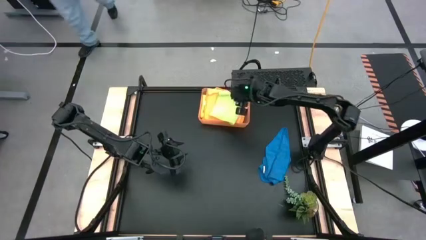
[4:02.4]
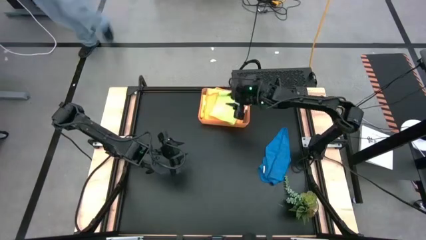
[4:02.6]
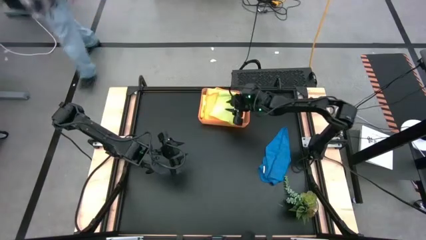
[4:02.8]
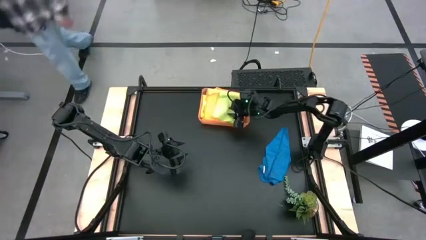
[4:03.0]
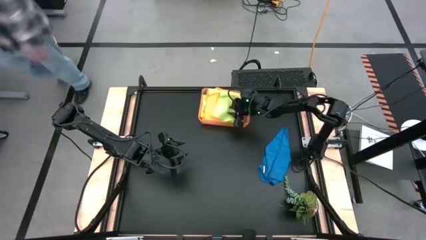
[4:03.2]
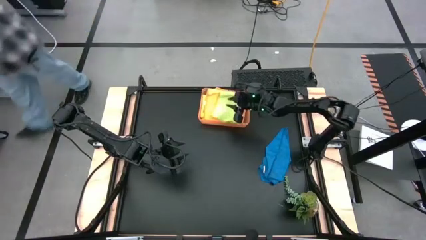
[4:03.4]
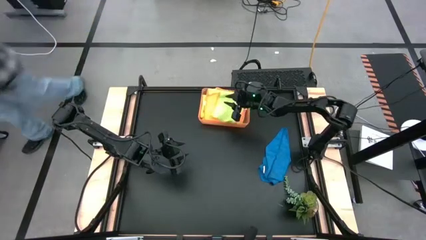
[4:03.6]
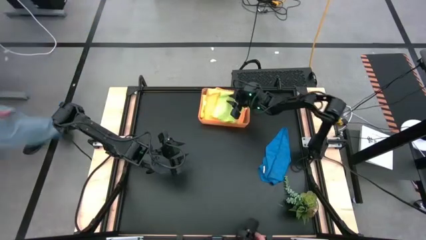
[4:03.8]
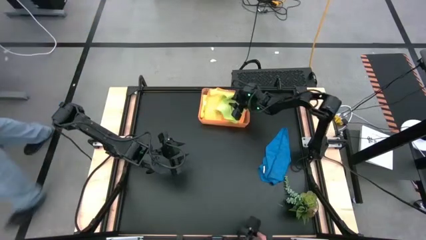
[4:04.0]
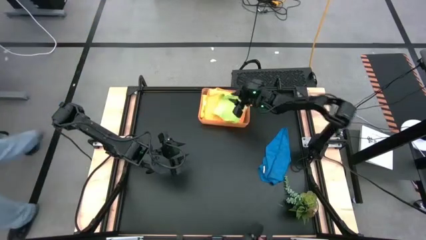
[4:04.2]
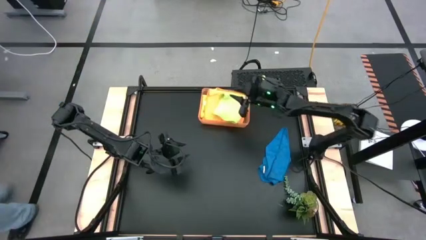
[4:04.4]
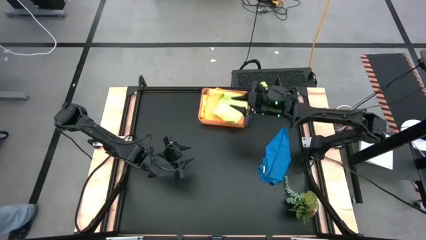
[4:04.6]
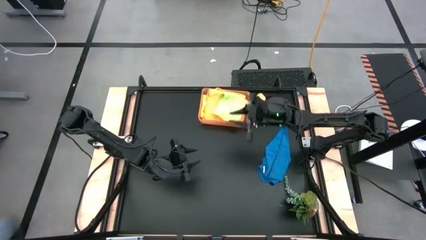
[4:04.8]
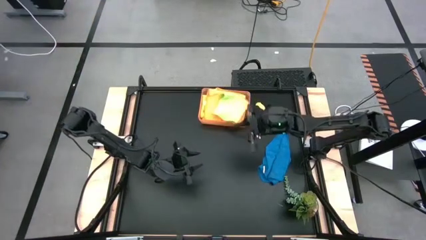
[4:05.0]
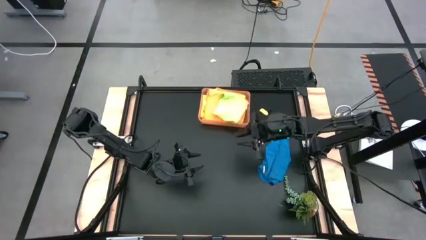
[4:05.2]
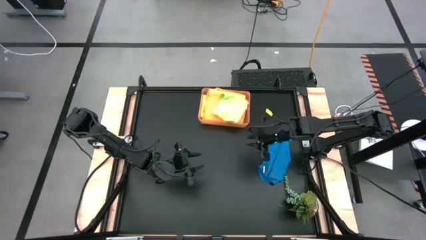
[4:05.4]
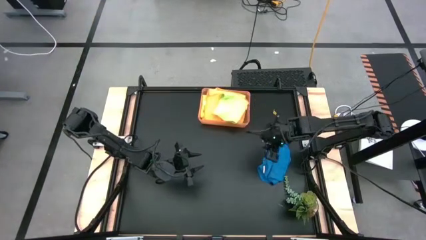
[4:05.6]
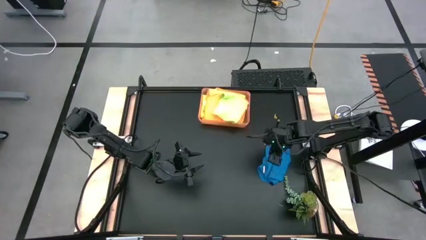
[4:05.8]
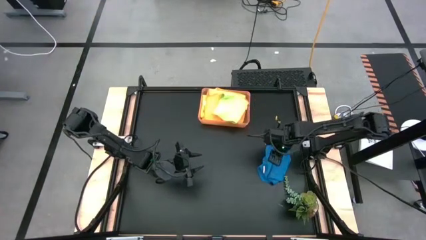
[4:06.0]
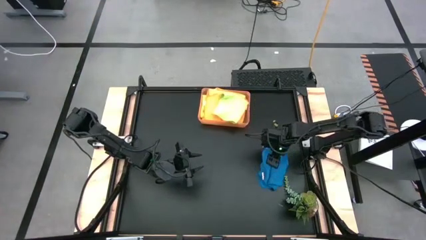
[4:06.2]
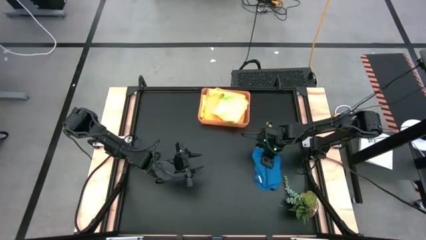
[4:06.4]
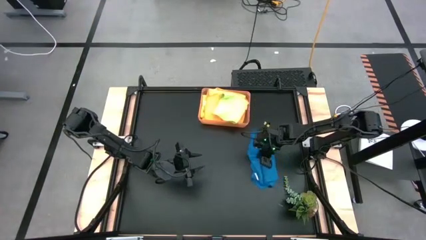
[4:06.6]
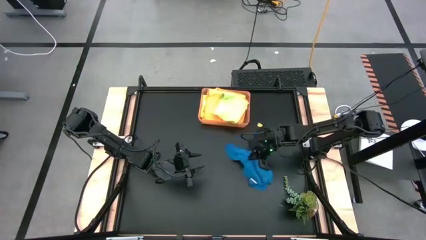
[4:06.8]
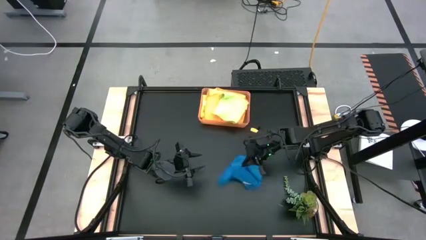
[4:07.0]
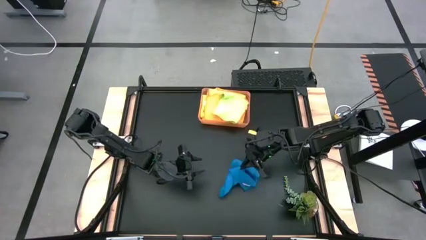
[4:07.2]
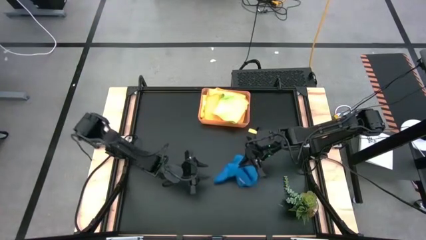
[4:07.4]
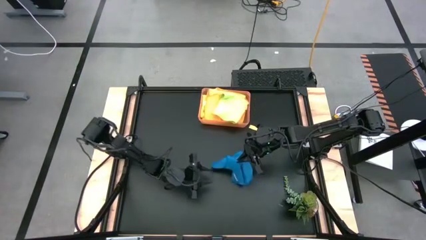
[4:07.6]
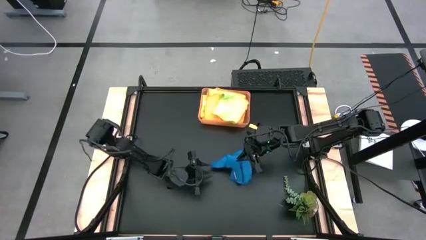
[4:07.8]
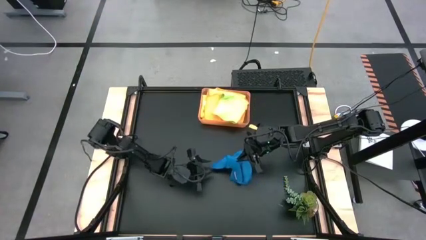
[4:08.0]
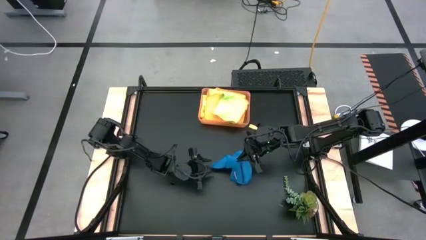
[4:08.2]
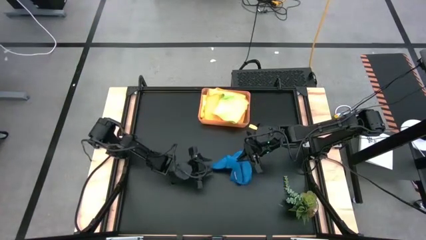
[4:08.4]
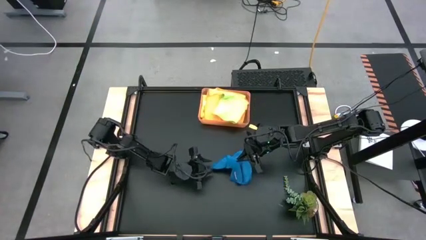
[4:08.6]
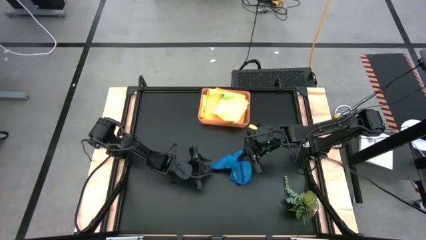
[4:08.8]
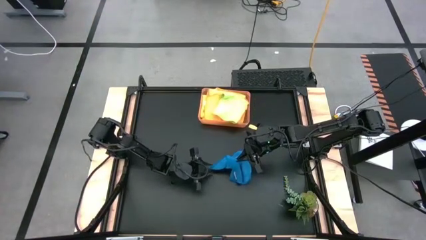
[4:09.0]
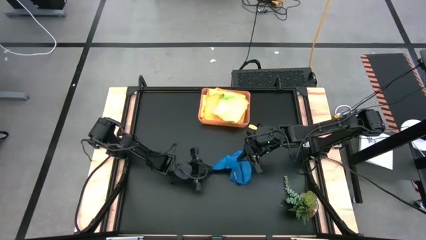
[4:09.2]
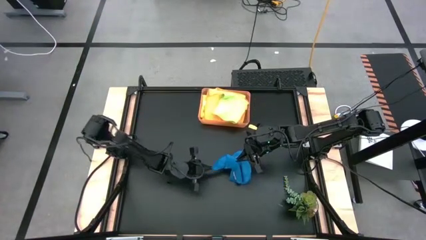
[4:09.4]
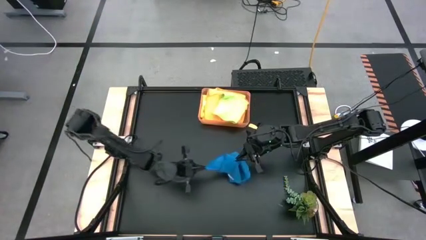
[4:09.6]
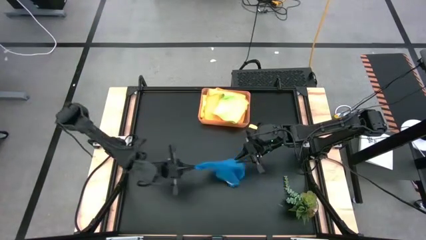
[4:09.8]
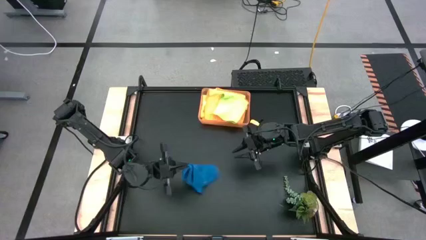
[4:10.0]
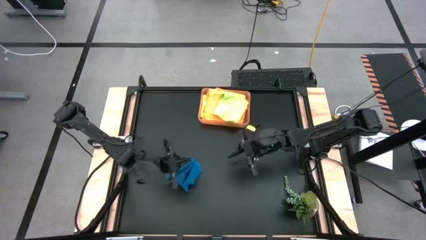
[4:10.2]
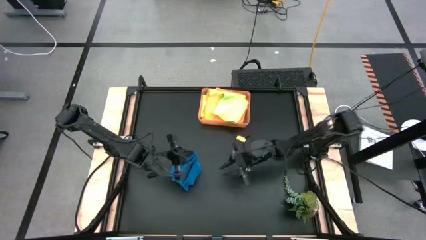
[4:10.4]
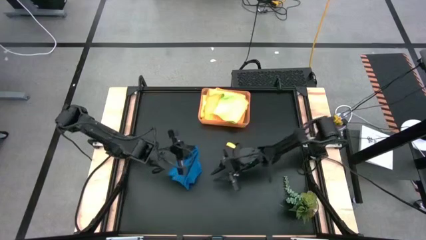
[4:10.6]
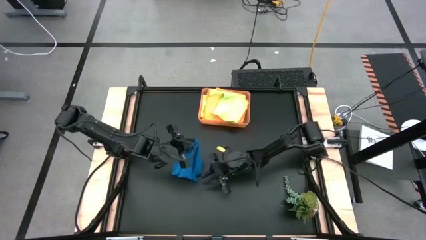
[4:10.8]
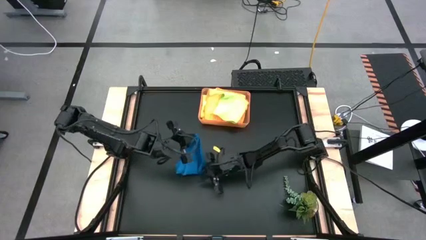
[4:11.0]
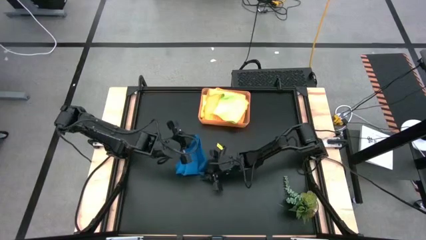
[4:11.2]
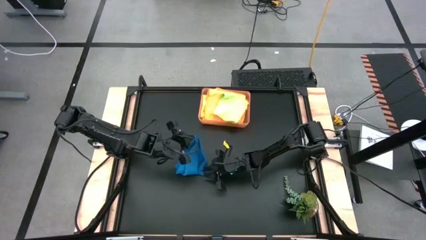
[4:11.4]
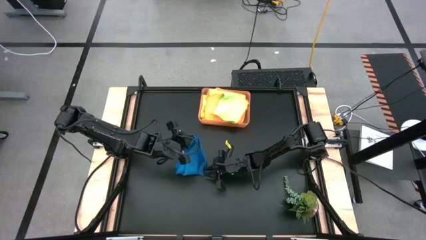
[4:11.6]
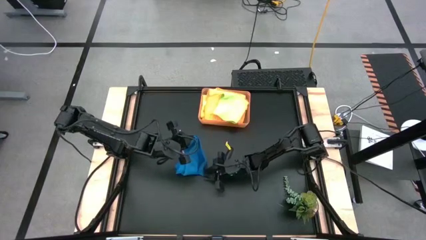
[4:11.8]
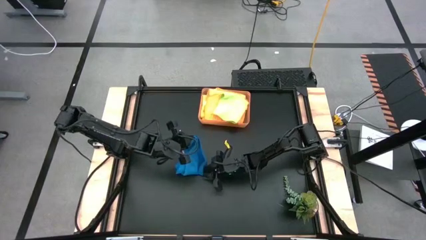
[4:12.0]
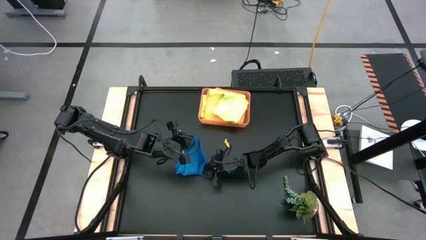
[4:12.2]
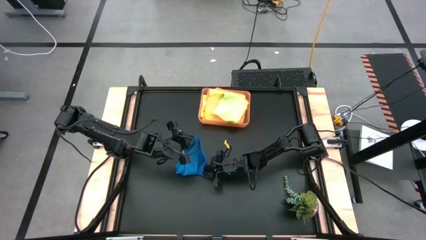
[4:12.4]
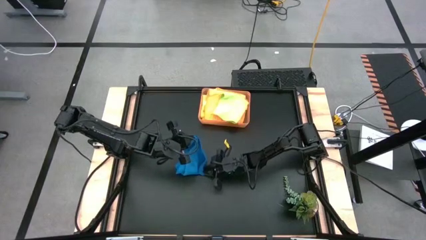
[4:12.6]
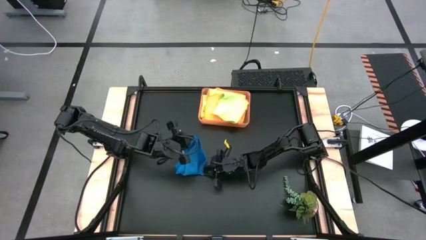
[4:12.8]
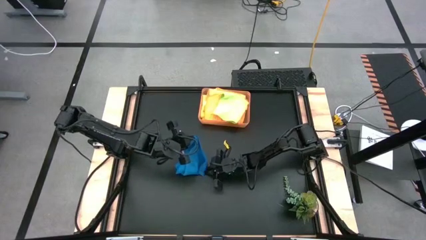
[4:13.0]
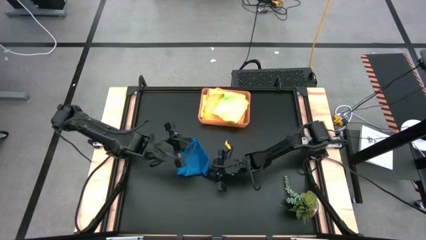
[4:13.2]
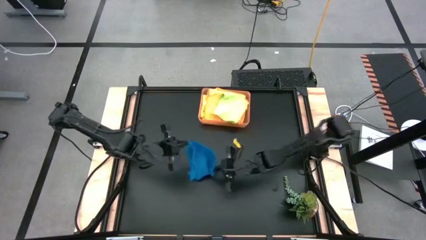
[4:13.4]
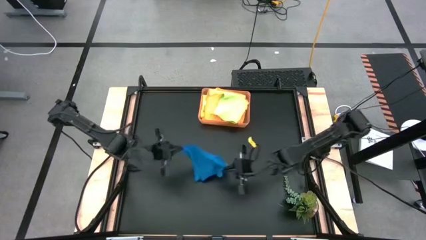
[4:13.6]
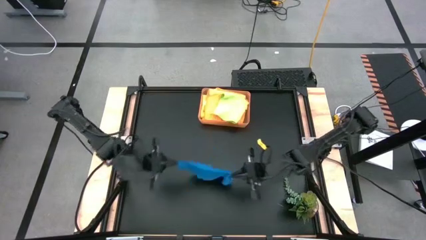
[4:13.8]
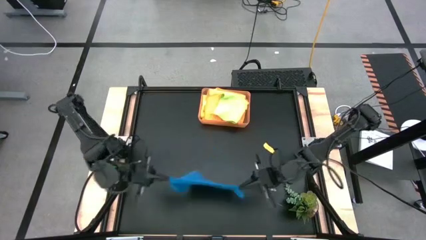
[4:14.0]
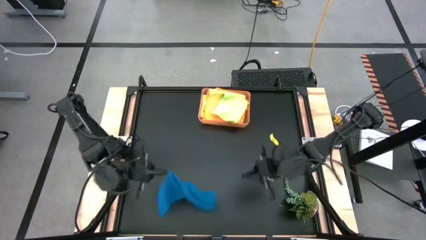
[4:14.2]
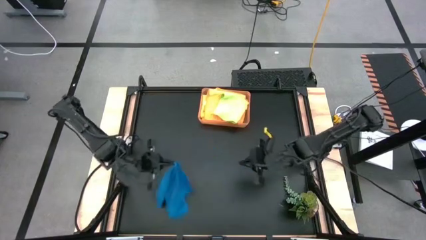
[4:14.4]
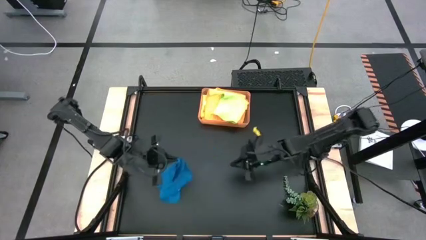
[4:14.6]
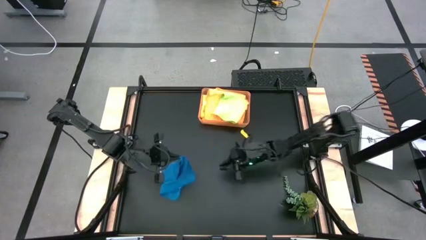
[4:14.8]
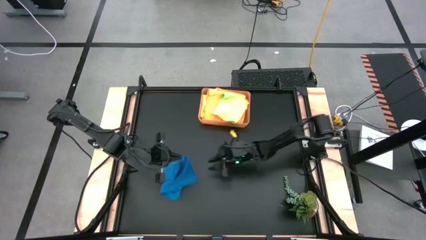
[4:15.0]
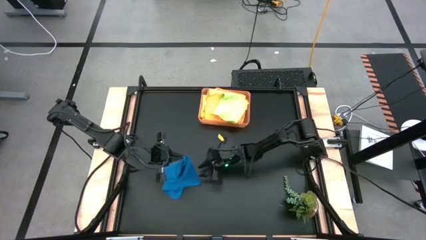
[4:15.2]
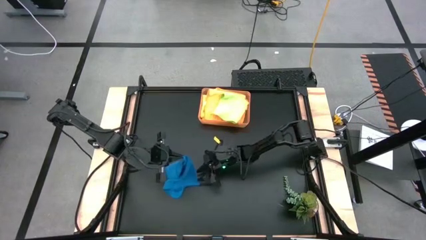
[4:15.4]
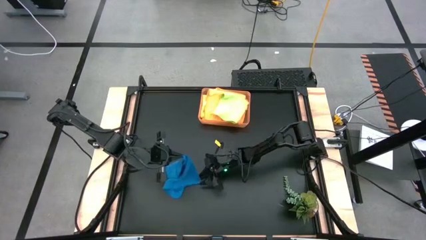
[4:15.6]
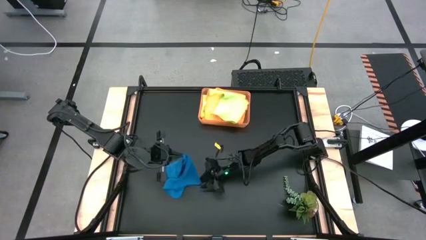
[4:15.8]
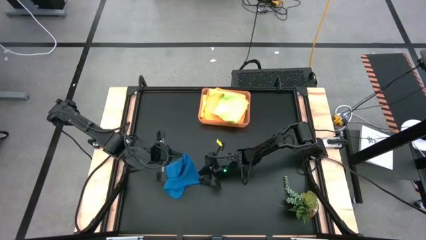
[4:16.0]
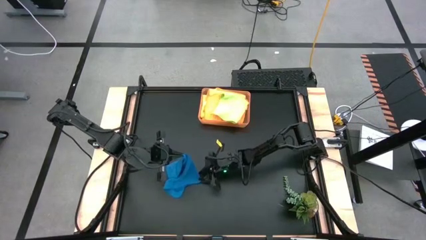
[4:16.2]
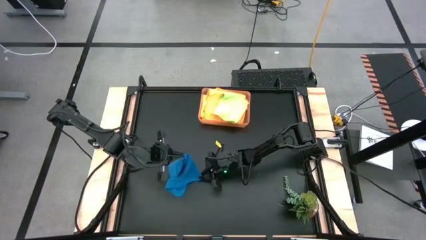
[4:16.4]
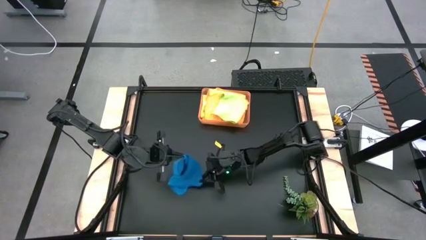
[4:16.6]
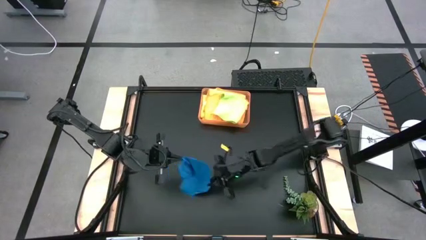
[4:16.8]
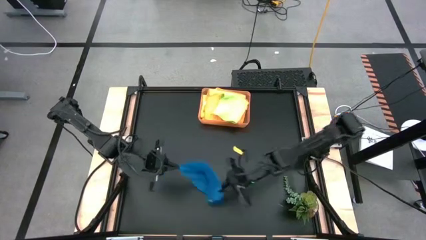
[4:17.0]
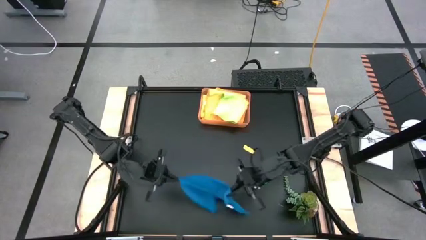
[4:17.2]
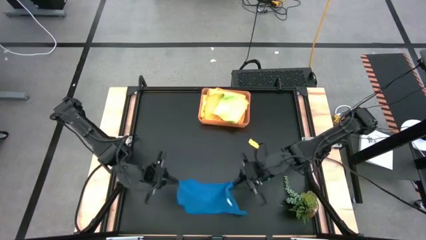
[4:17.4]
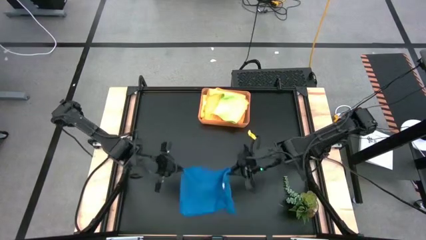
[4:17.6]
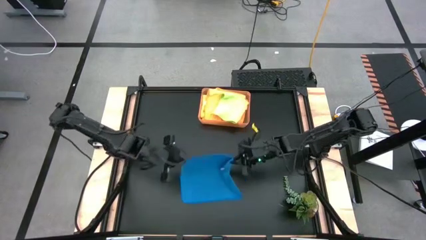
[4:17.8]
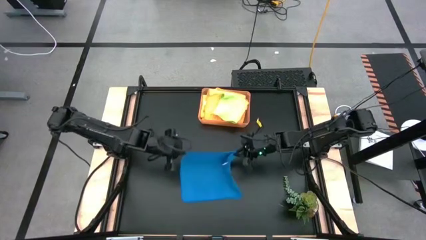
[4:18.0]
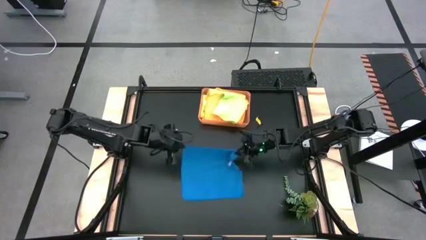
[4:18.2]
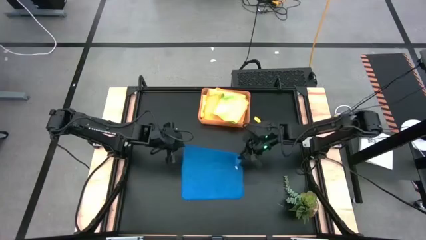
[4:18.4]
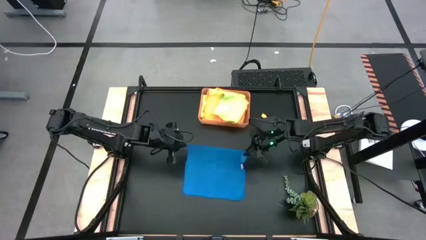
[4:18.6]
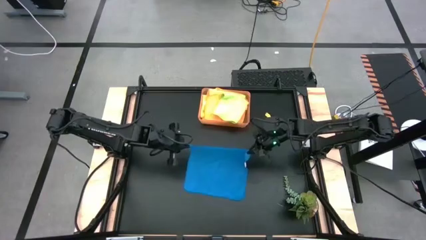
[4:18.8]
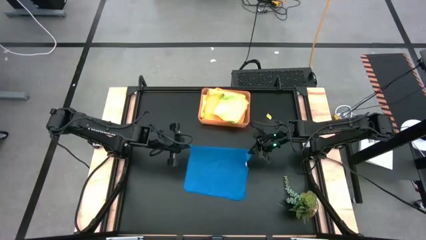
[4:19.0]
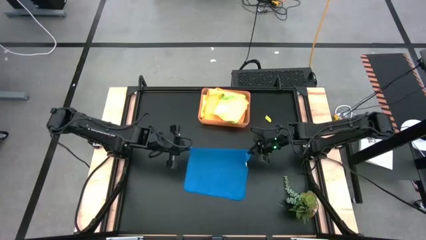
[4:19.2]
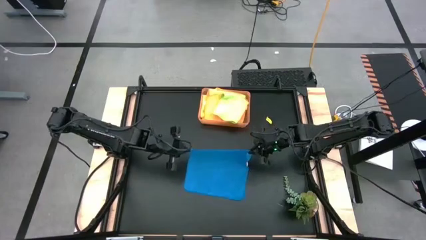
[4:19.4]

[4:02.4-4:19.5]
Task: Fold microfiber towels
Fold the blue towel
